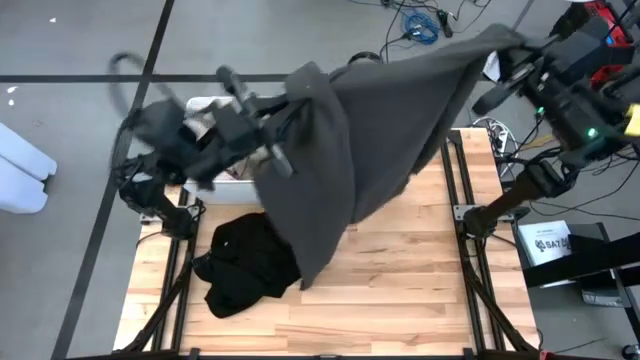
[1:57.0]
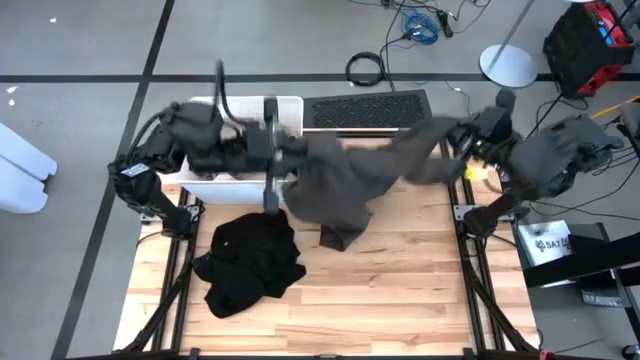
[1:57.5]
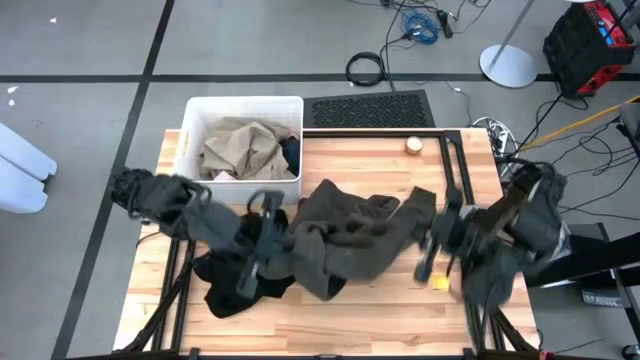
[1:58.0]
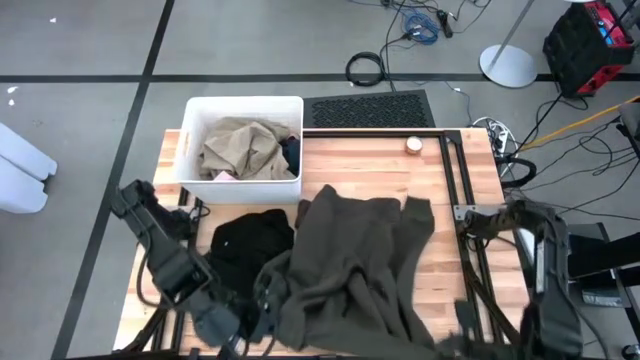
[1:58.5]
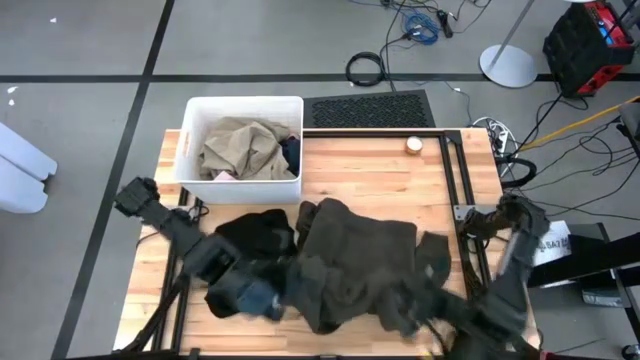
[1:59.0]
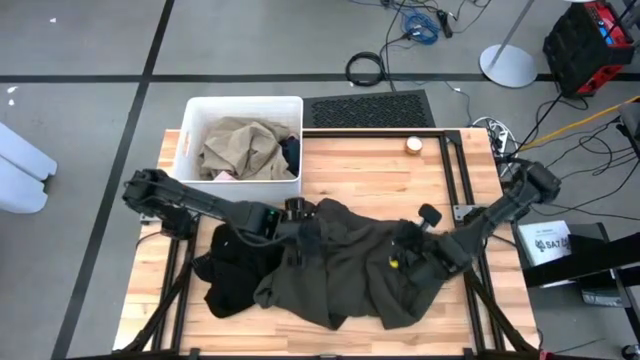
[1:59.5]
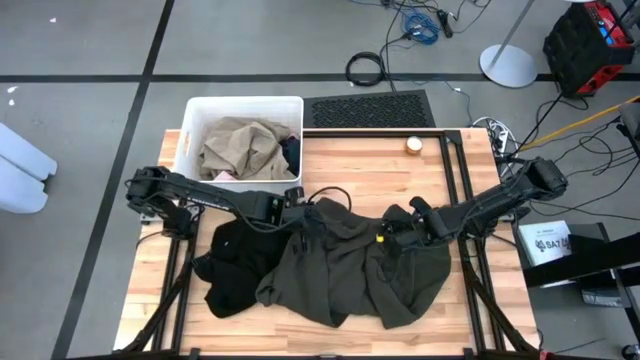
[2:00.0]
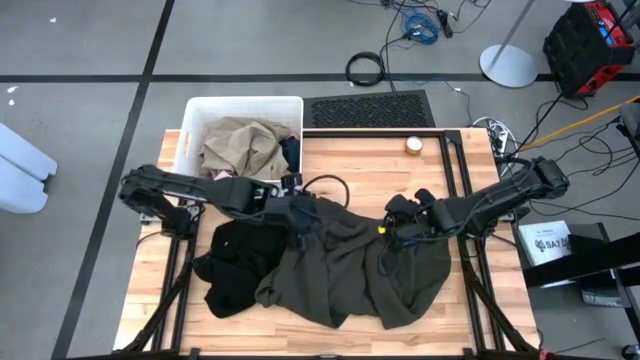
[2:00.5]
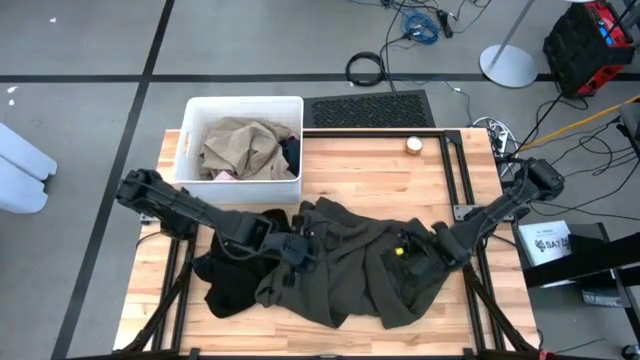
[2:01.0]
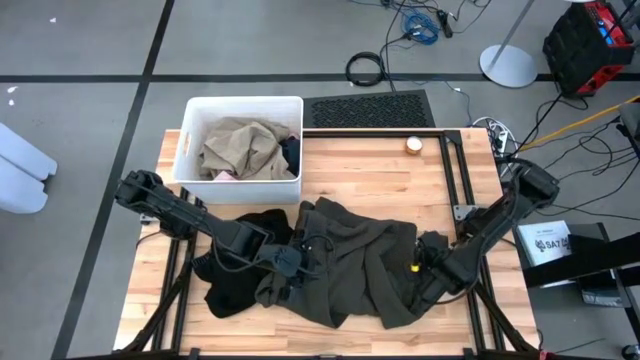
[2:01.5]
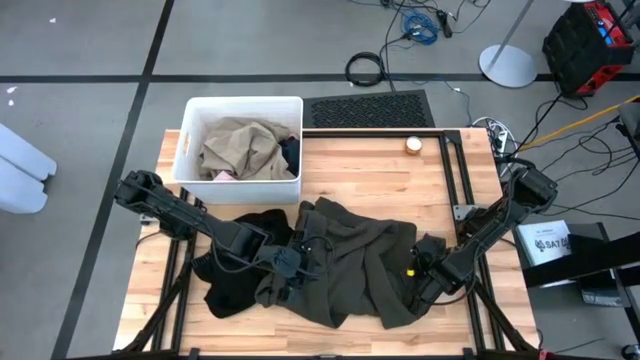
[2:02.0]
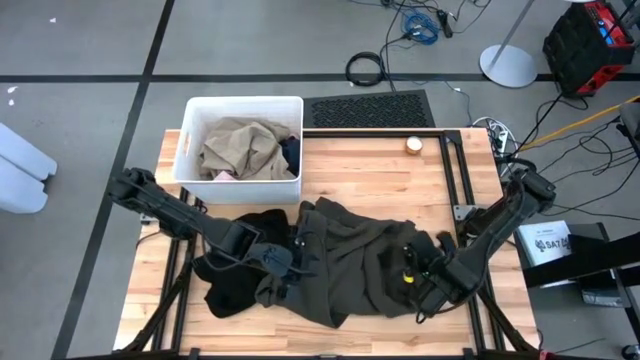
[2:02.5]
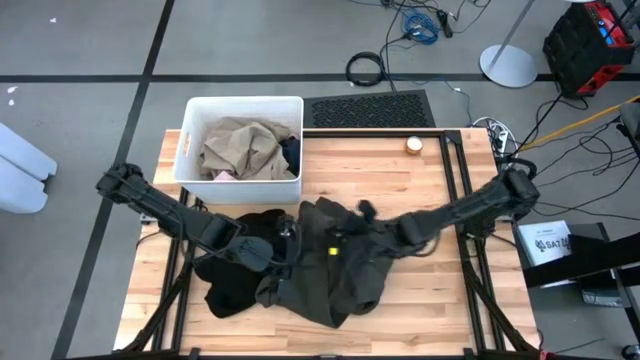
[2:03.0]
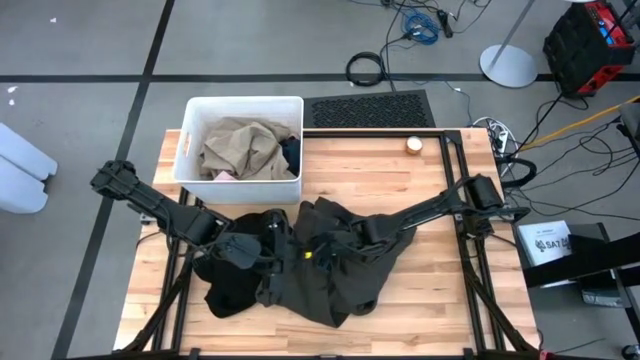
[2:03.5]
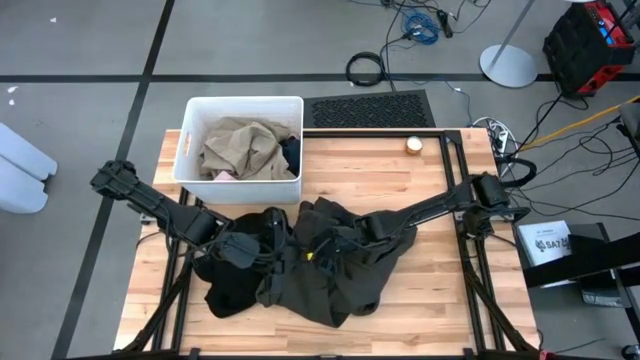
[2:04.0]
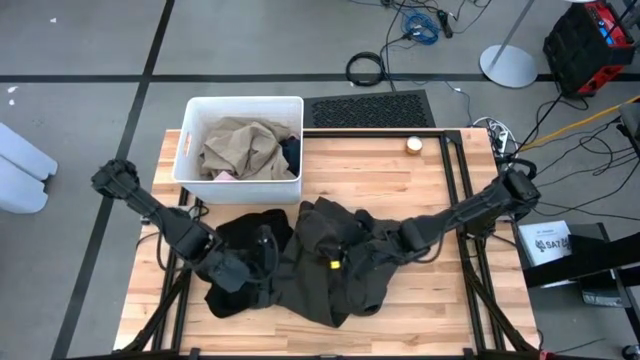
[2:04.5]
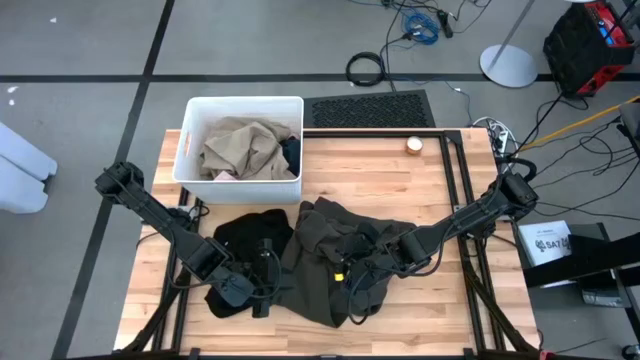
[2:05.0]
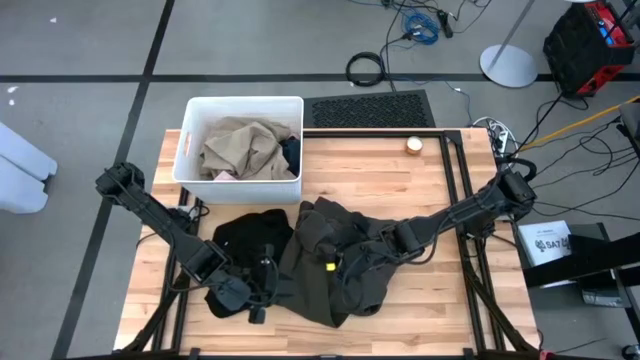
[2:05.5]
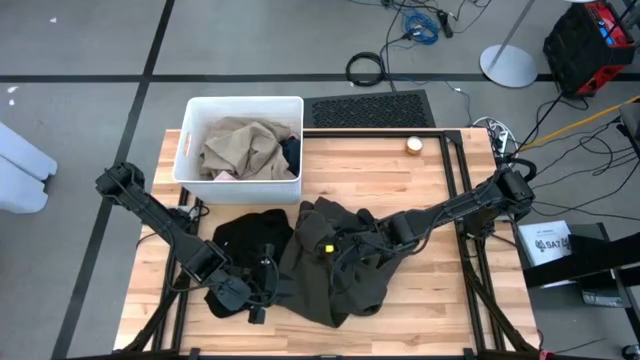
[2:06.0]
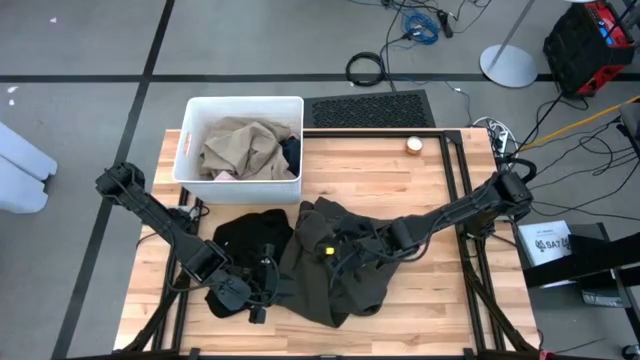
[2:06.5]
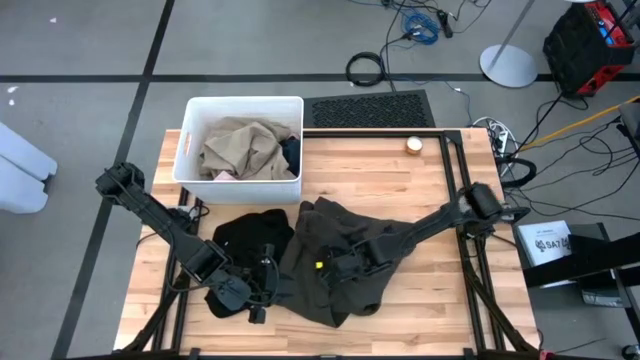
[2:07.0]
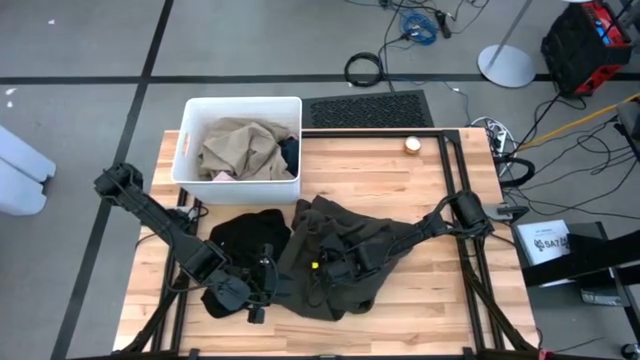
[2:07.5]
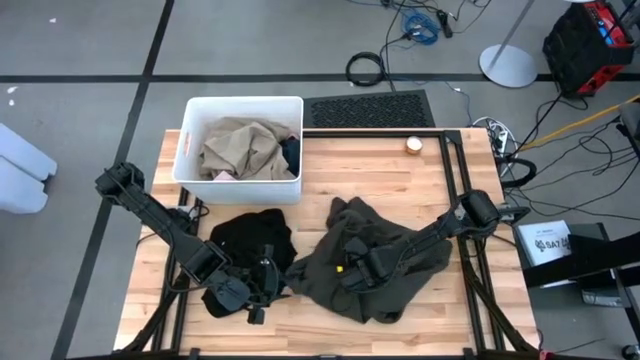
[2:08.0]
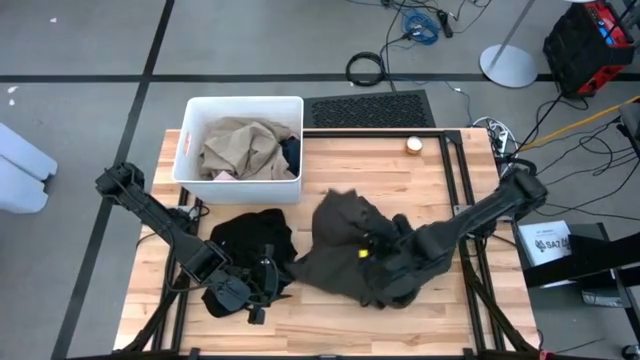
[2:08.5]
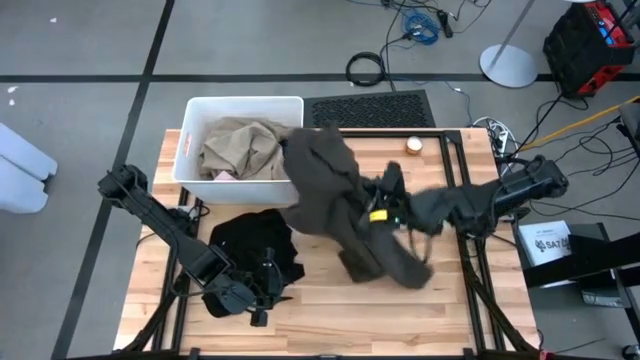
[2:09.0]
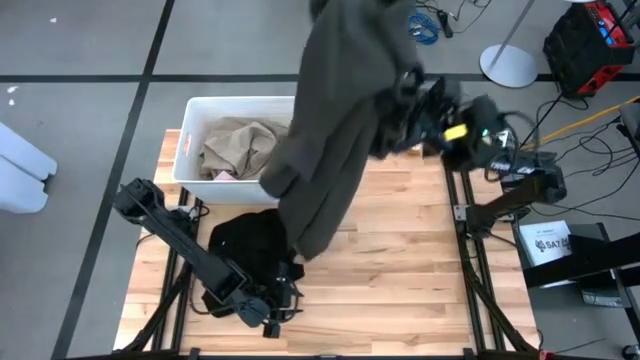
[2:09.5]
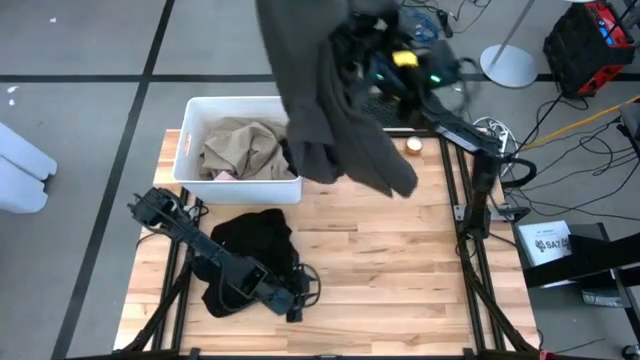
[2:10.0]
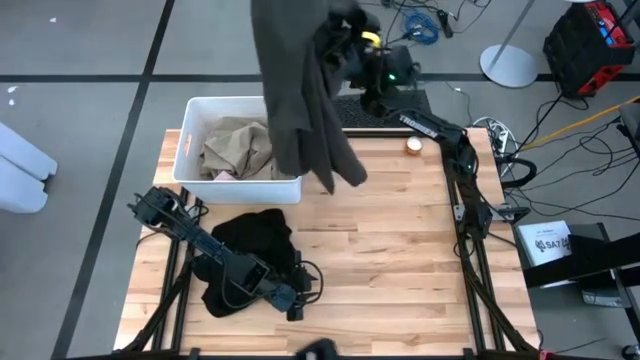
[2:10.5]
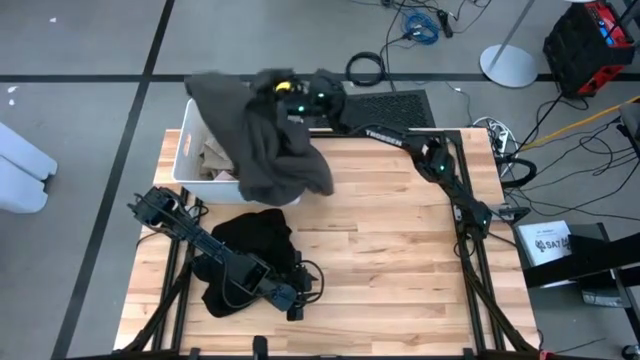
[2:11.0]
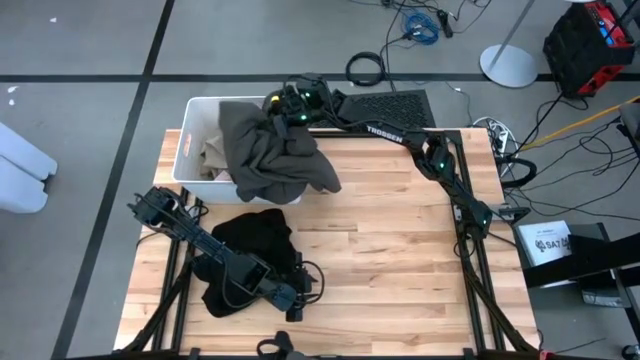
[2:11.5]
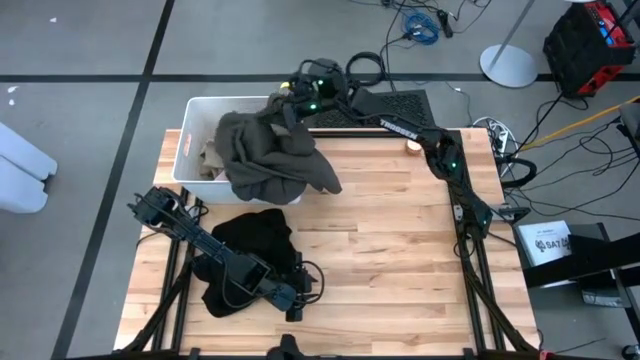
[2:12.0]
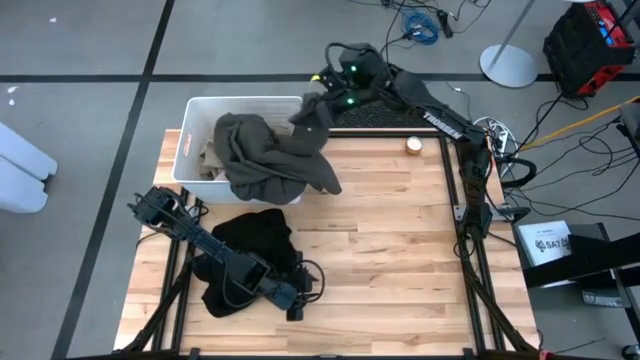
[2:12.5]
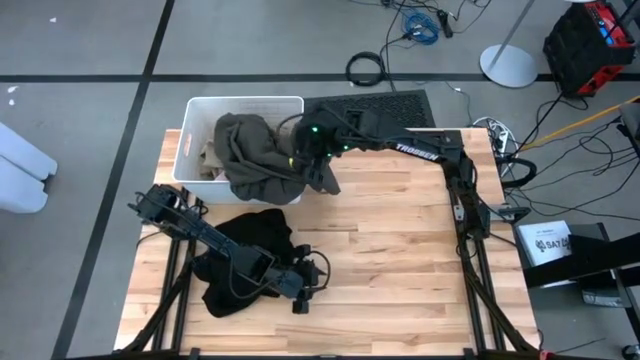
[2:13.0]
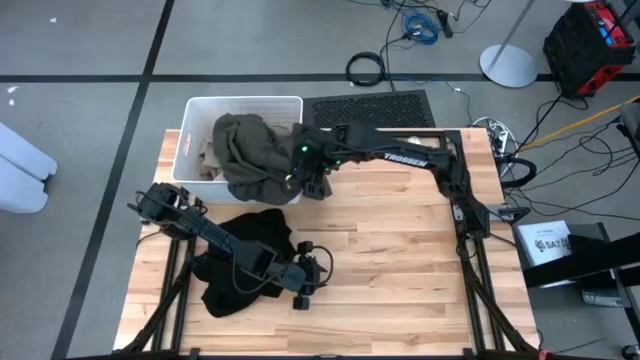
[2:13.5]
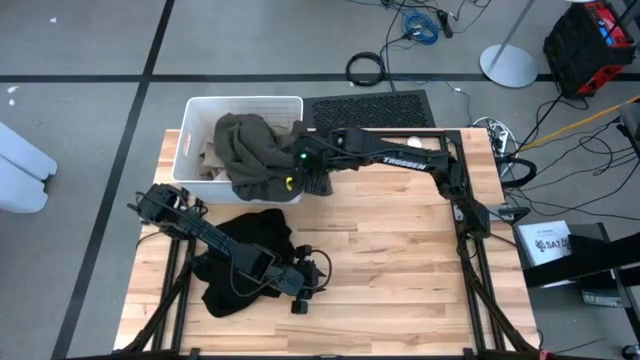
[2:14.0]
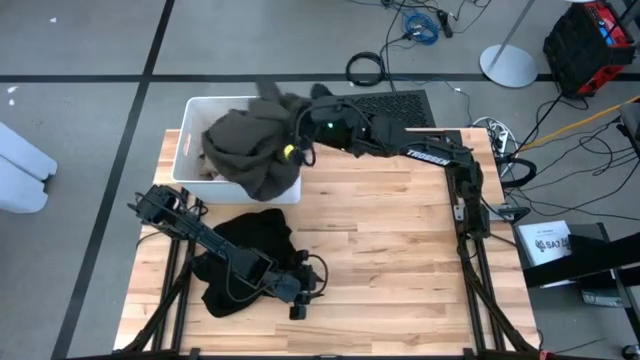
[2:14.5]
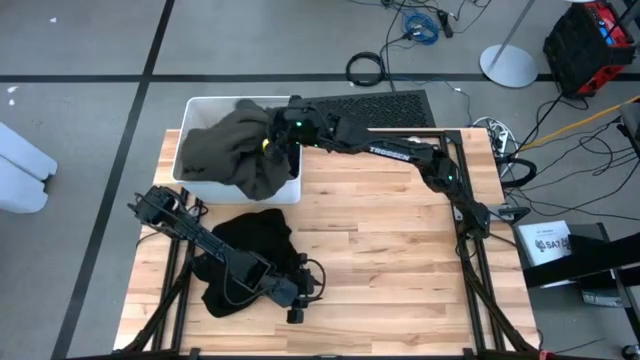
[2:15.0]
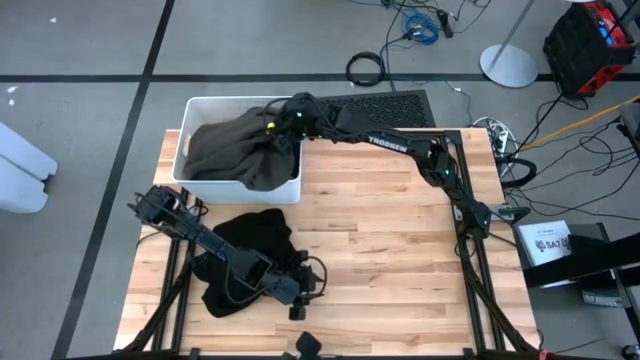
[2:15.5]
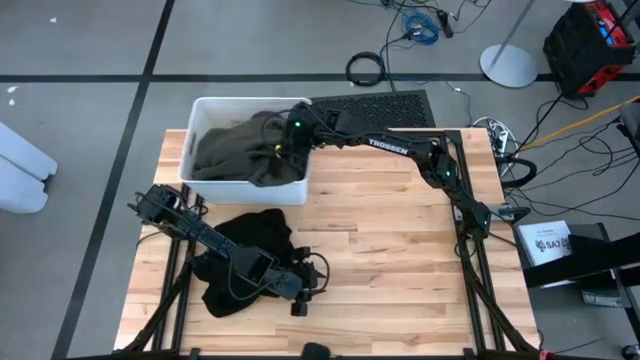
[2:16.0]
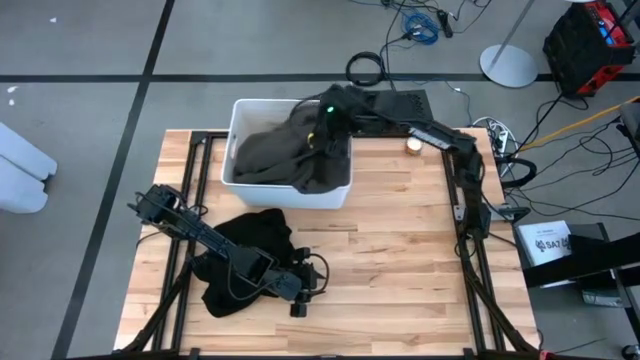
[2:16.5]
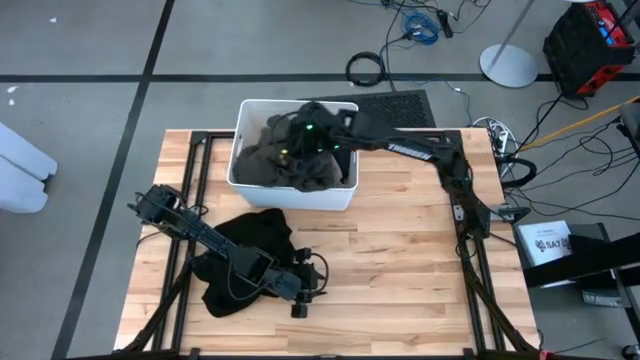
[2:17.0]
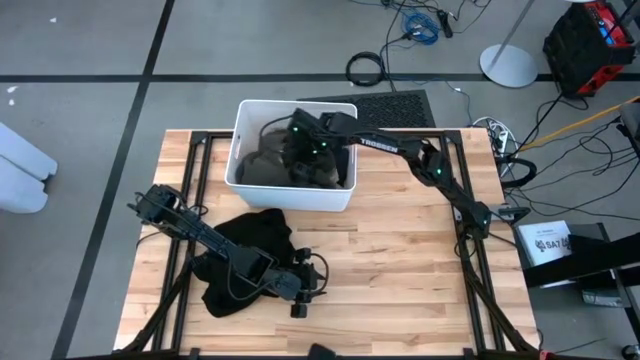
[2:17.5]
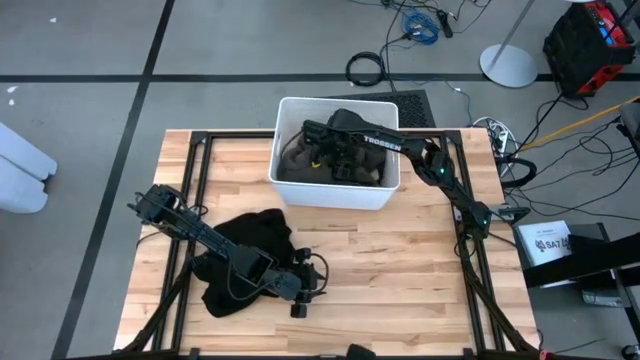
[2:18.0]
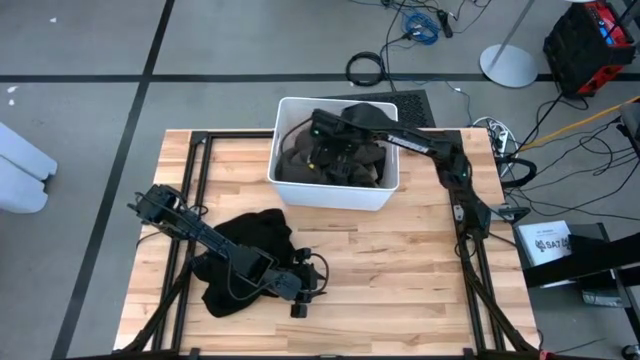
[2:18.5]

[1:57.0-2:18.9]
Task: Sort clothes
Put the dark gray jacket into the white laundry bin
